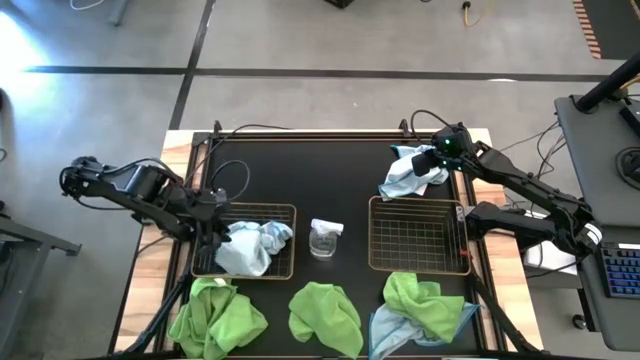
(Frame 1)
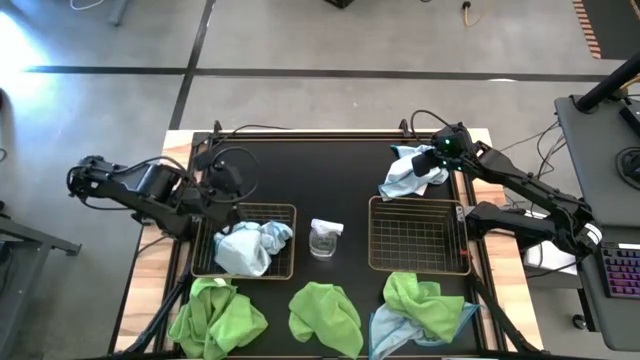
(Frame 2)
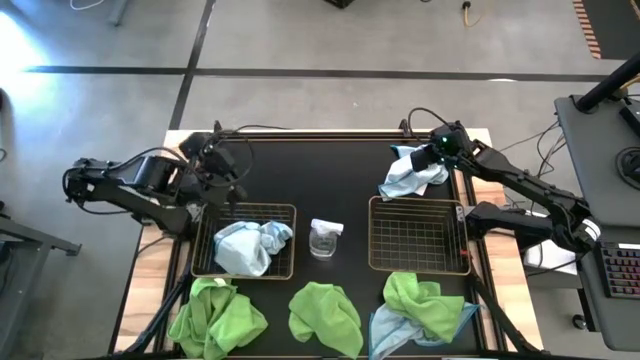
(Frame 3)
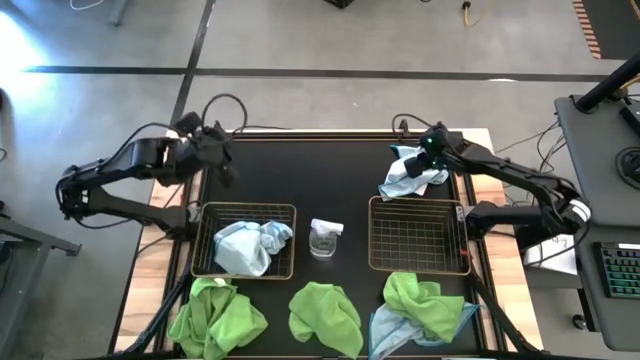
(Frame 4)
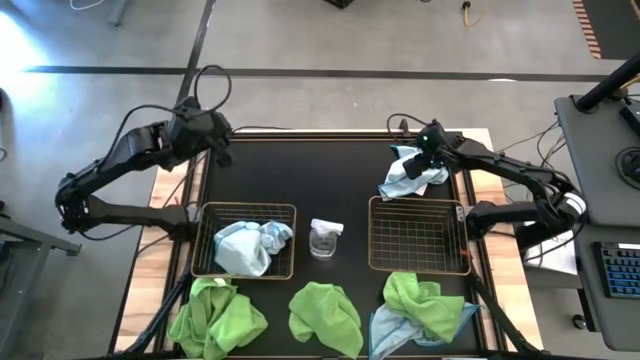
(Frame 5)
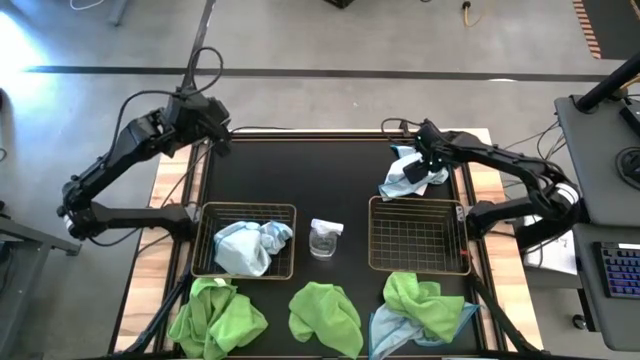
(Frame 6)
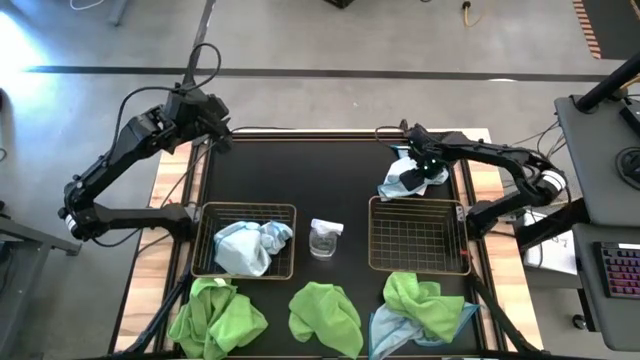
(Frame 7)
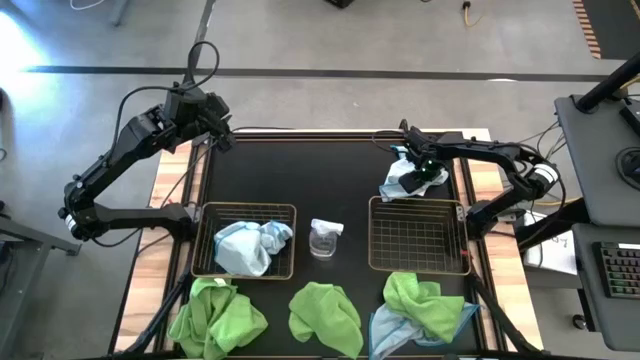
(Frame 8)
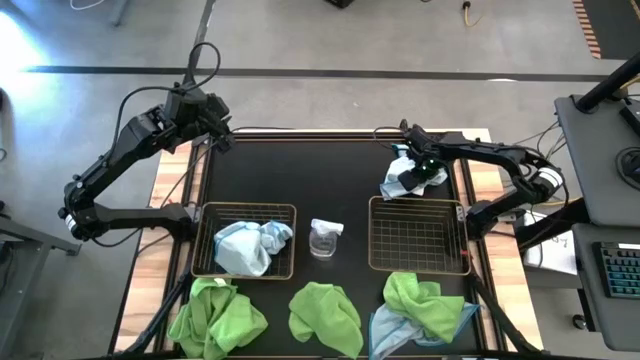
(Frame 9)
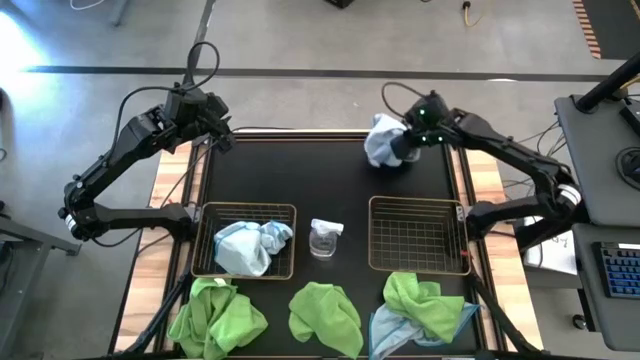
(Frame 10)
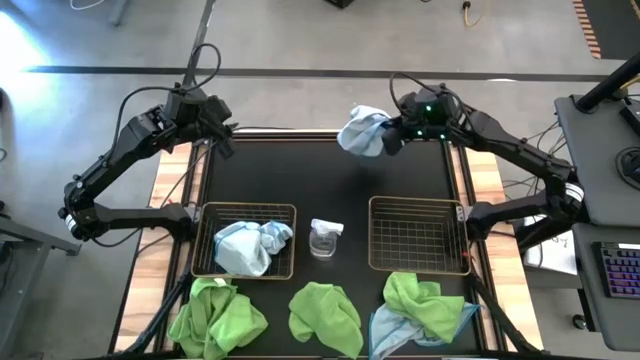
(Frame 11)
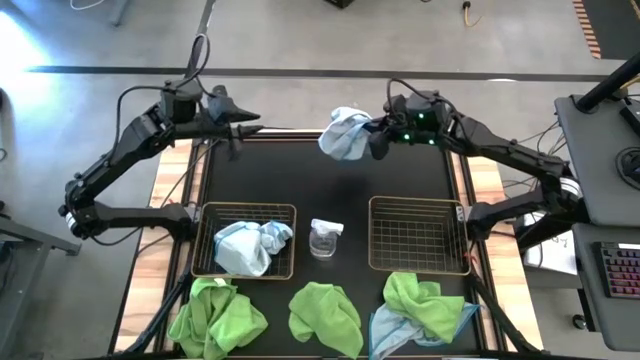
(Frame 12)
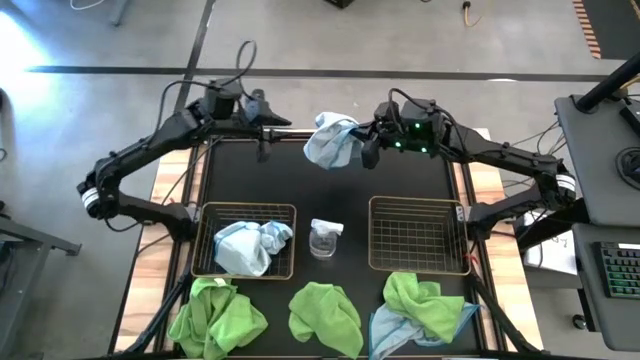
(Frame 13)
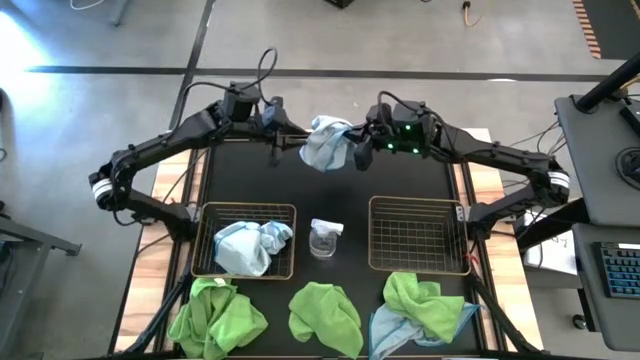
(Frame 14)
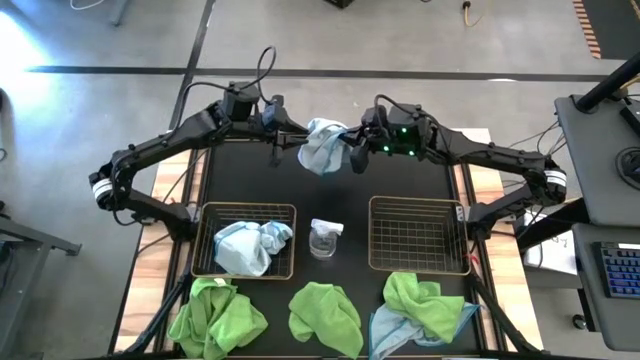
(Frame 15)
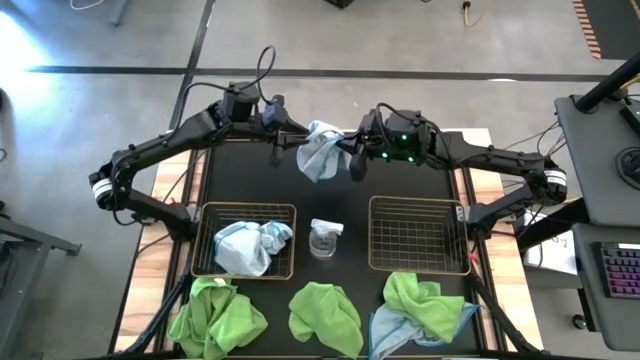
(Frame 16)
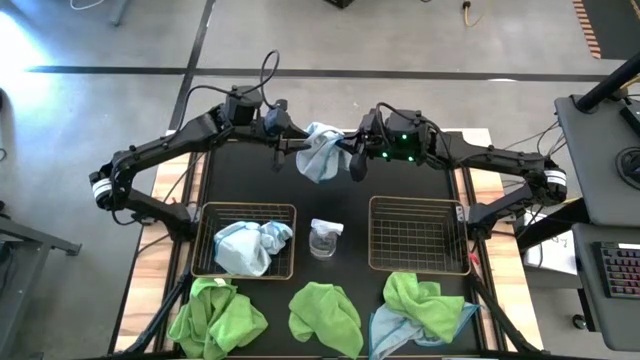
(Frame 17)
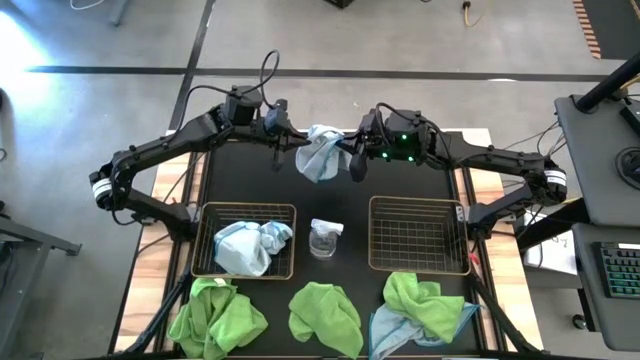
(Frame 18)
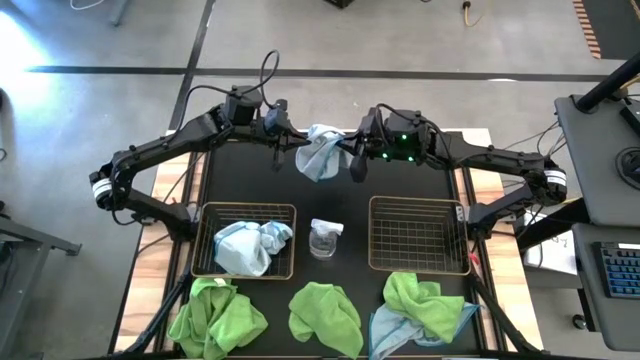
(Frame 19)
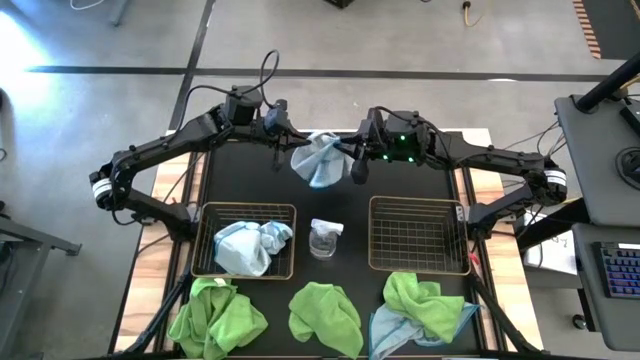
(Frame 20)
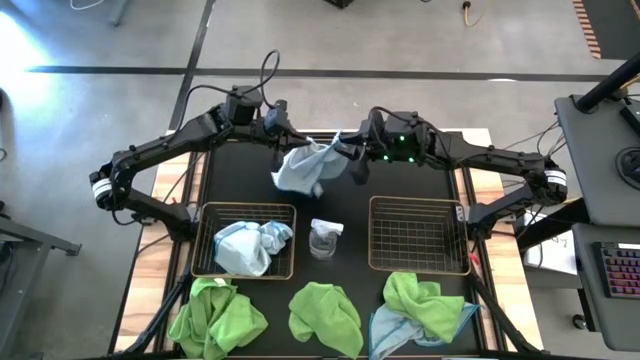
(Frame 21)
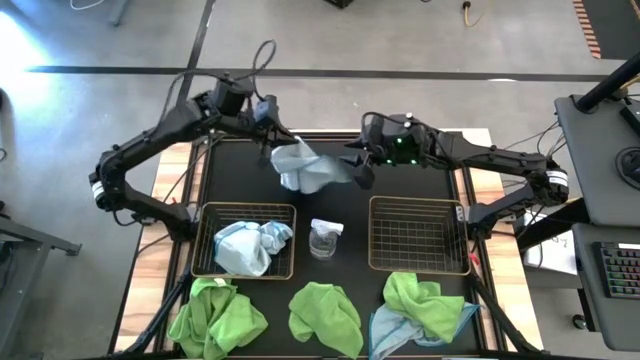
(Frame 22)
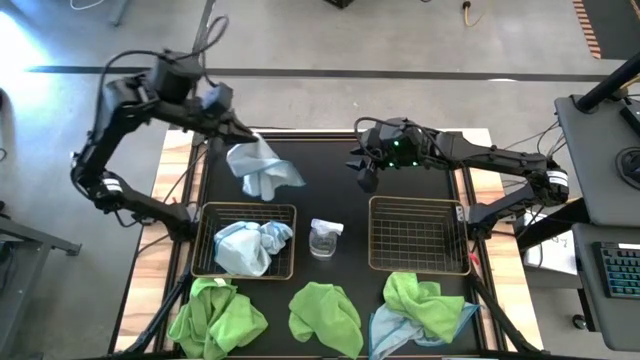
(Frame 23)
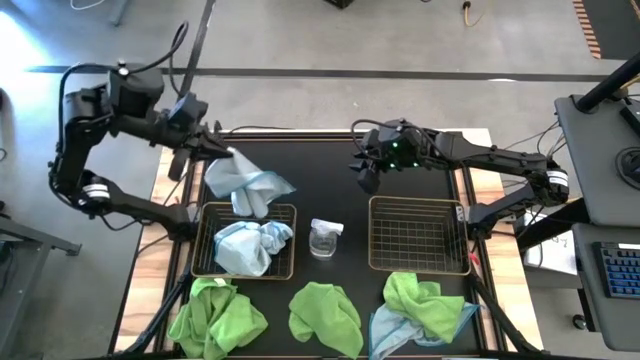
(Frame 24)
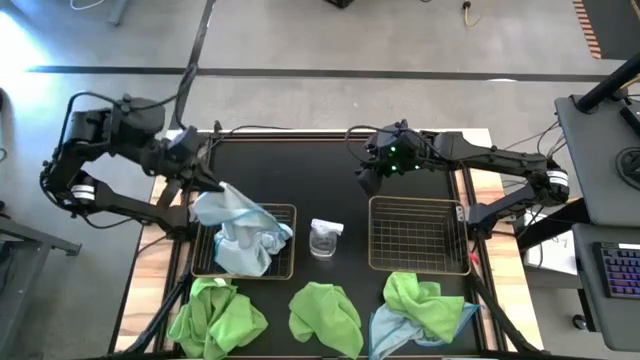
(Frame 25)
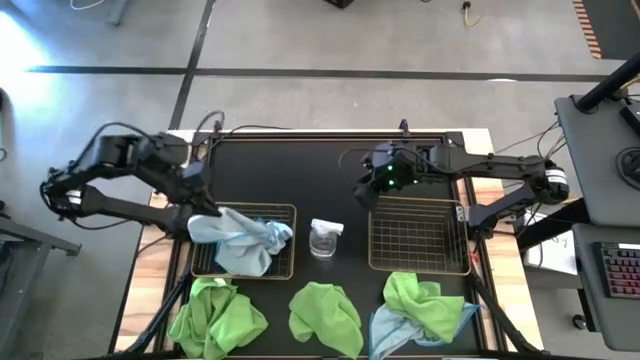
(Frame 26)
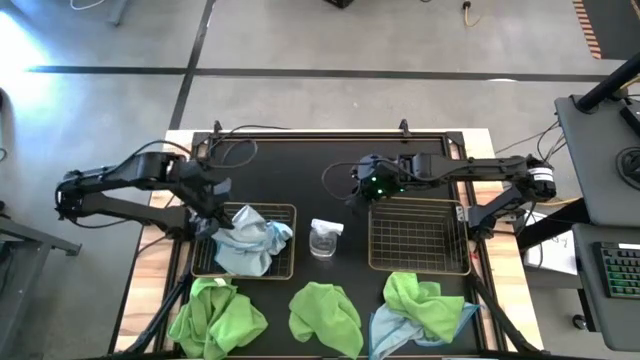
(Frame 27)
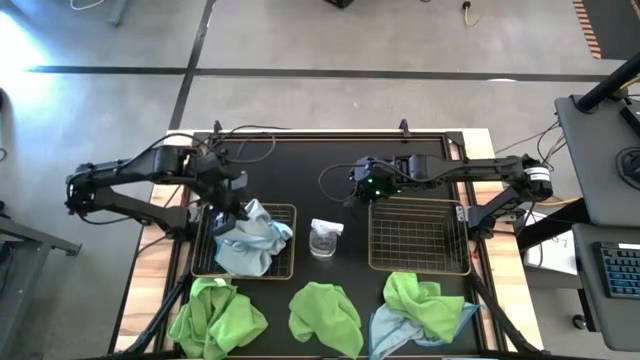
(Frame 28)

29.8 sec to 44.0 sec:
Task: Sort microfiber towel by color & place in baskets
Put the blue microfiber towel into the left wire basket

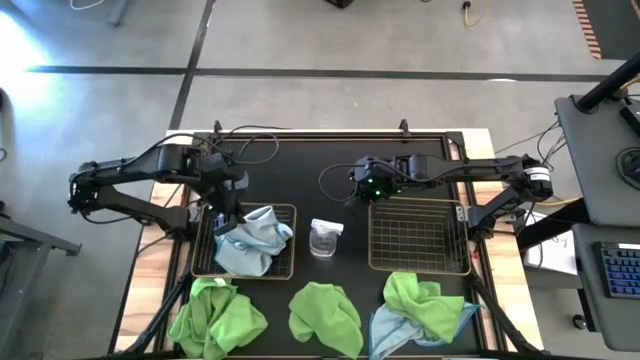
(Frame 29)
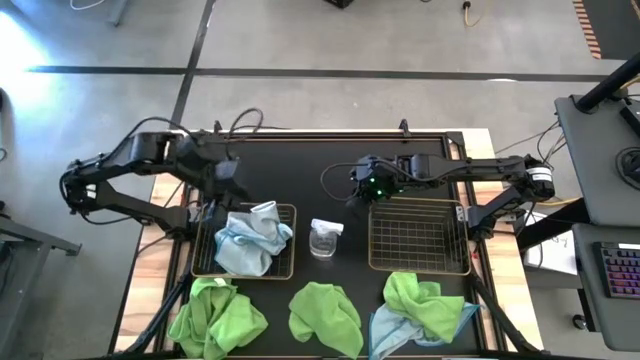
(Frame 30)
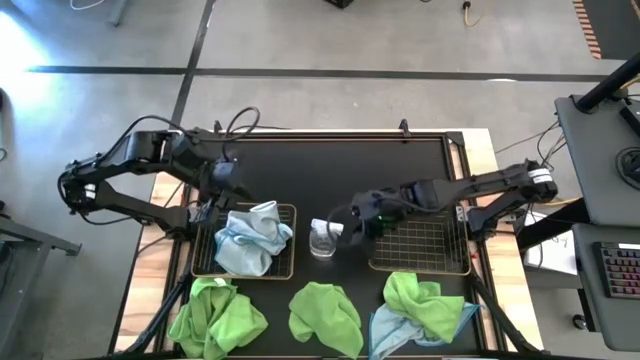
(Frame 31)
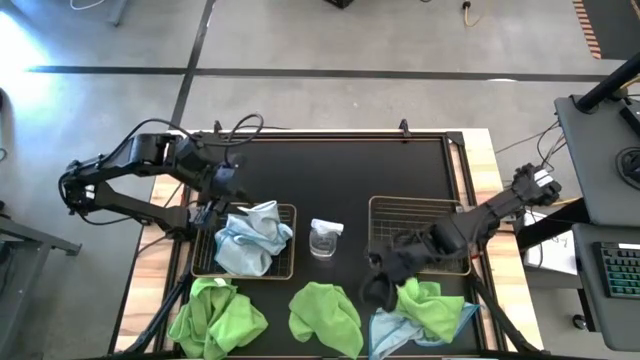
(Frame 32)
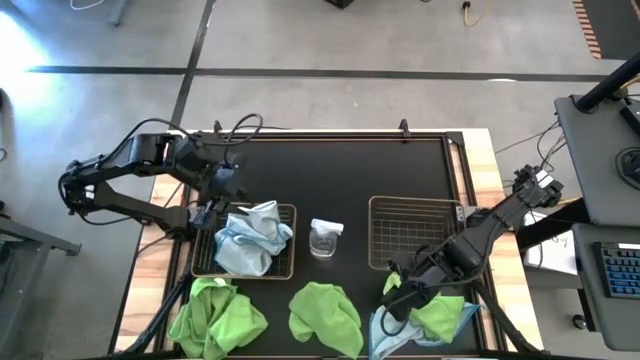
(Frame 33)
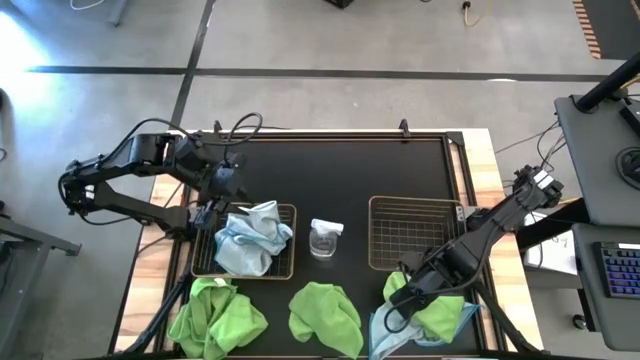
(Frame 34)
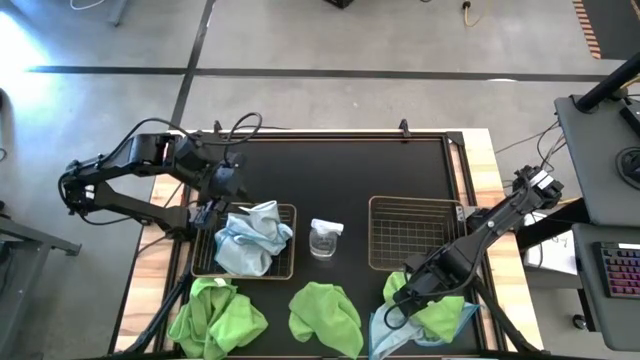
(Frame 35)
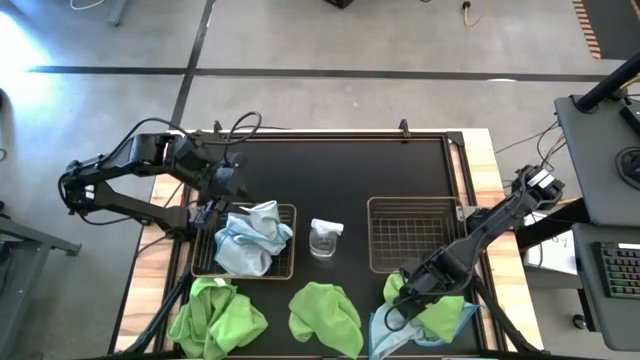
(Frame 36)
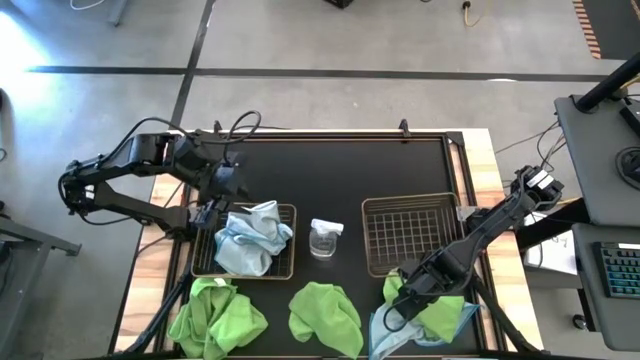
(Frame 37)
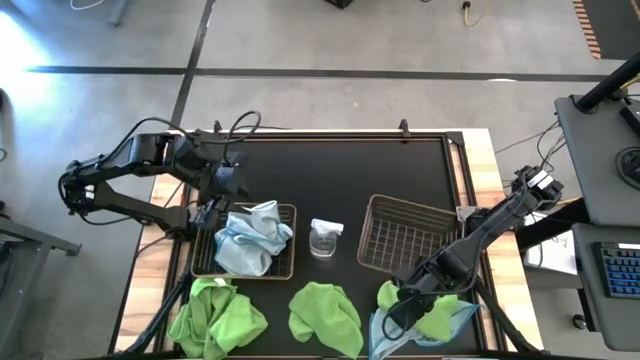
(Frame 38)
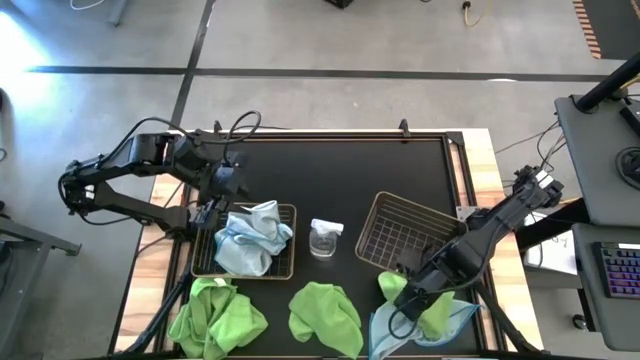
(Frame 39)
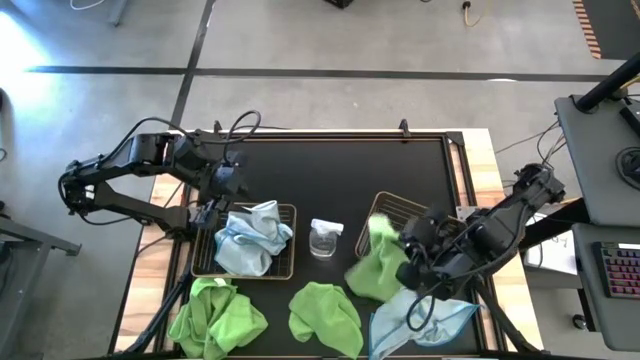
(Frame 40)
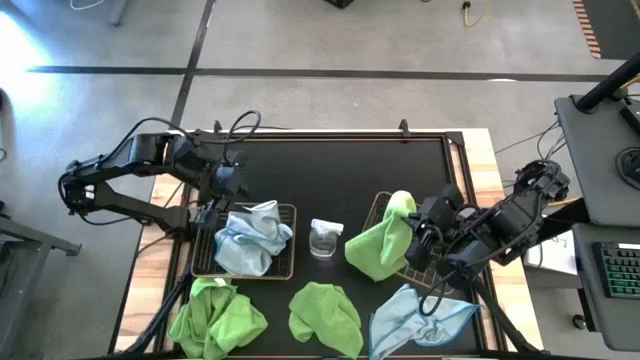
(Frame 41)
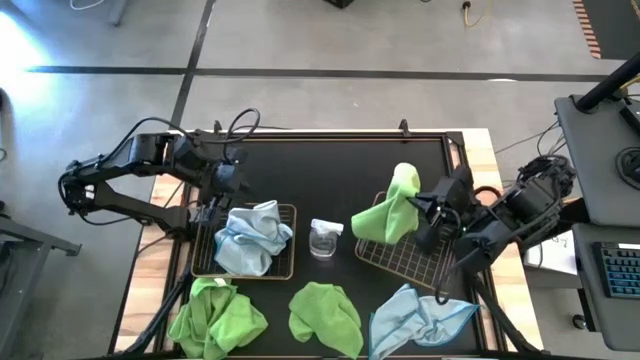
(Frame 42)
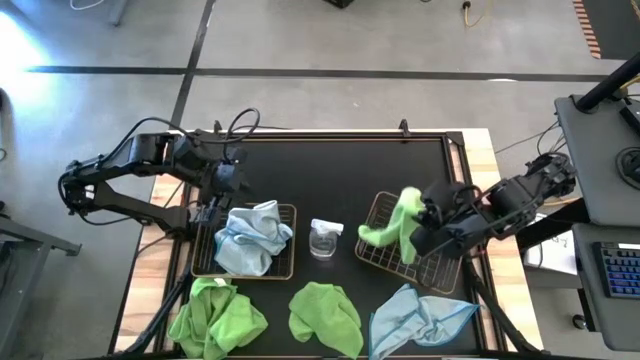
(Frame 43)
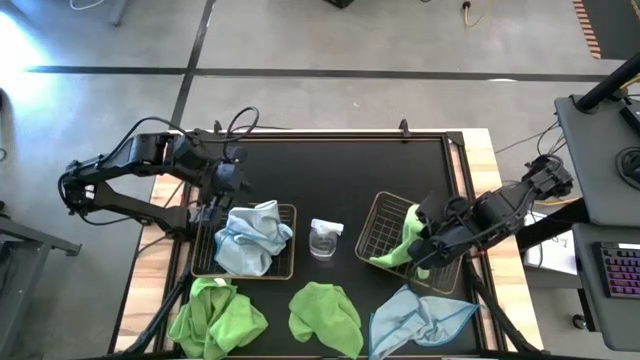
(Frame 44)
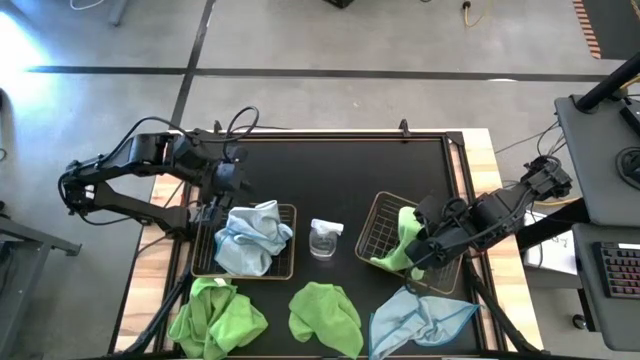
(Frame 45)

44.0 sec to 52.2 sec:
Put the green microfiber towel into the right wire basket
